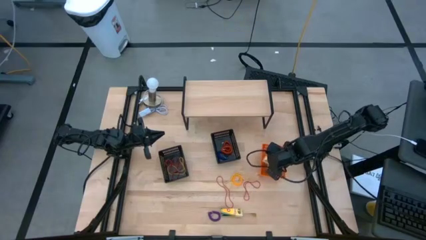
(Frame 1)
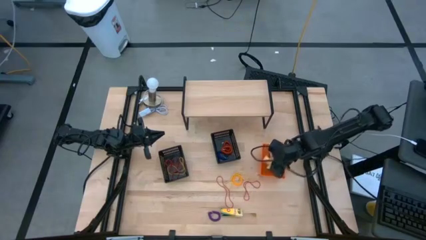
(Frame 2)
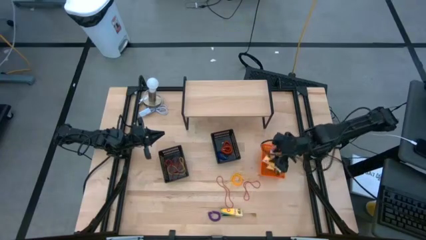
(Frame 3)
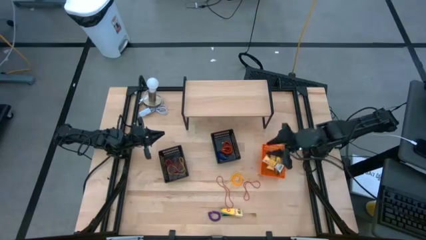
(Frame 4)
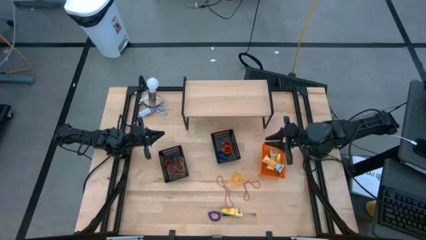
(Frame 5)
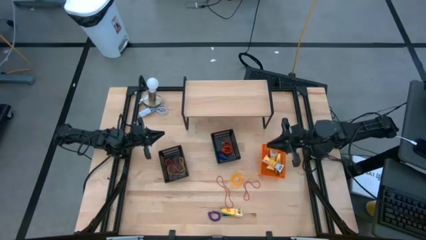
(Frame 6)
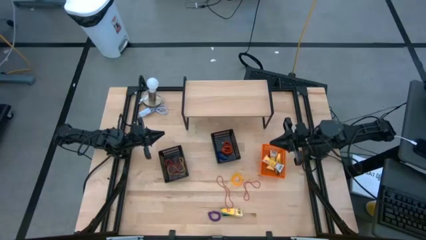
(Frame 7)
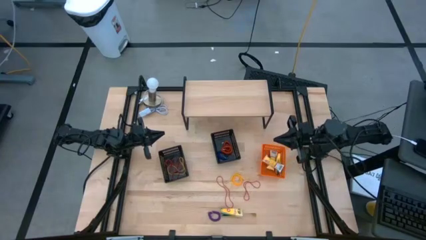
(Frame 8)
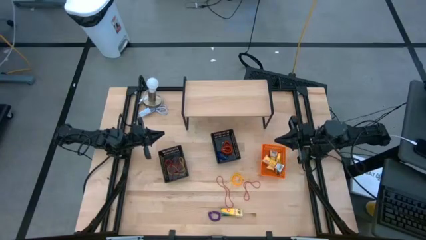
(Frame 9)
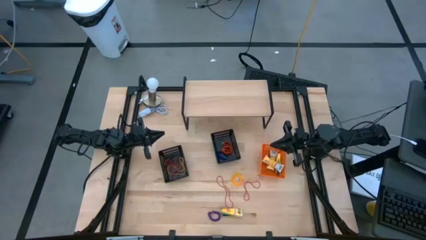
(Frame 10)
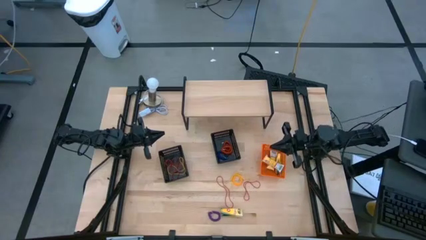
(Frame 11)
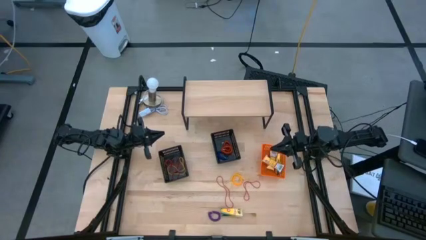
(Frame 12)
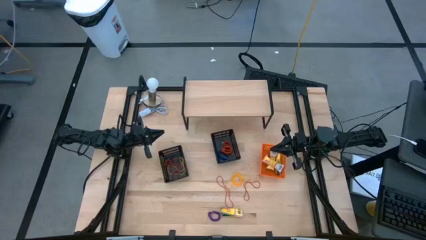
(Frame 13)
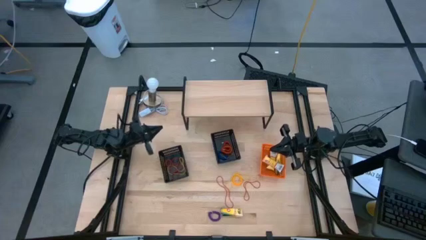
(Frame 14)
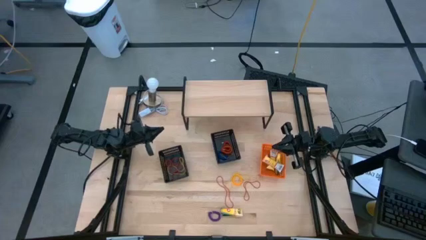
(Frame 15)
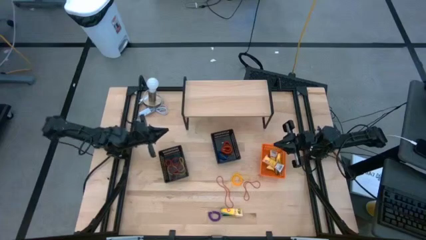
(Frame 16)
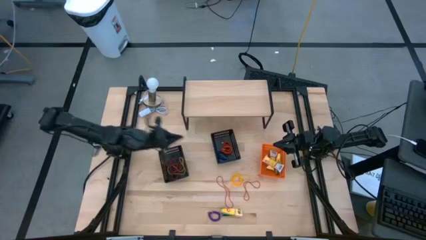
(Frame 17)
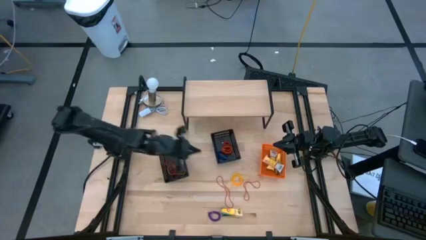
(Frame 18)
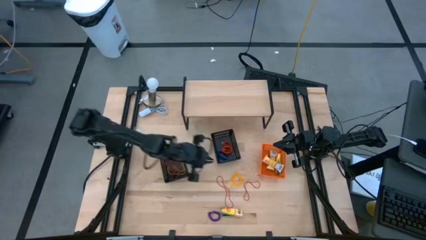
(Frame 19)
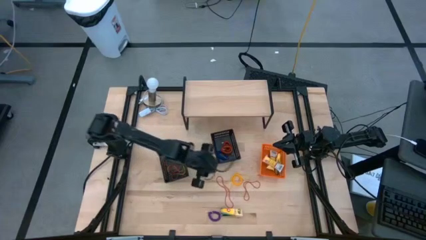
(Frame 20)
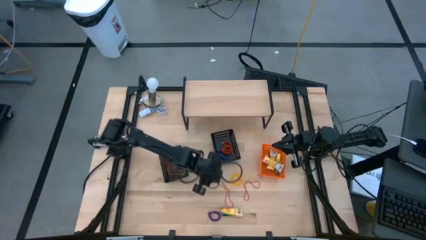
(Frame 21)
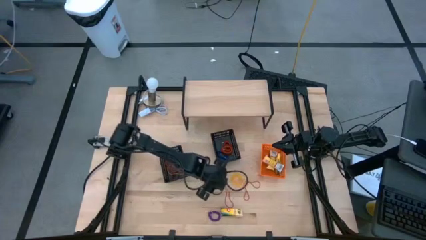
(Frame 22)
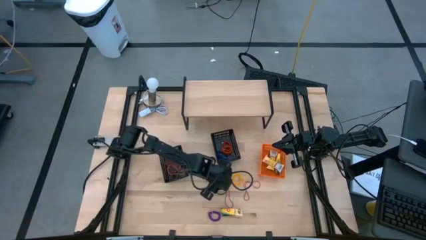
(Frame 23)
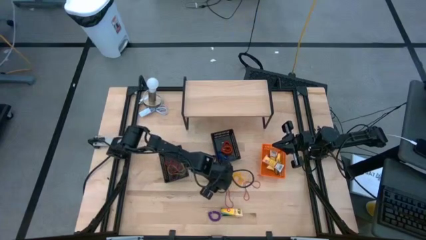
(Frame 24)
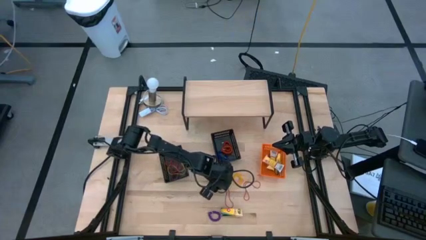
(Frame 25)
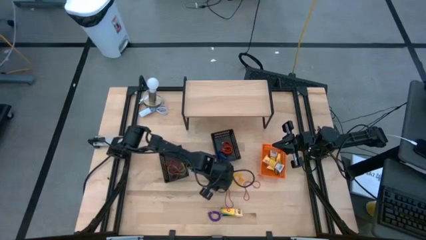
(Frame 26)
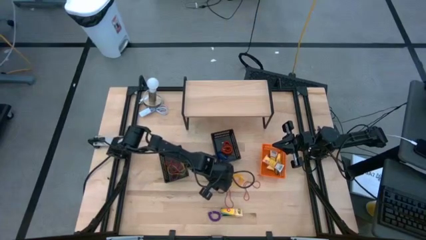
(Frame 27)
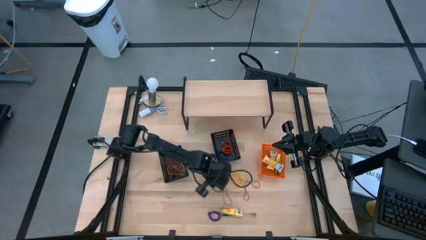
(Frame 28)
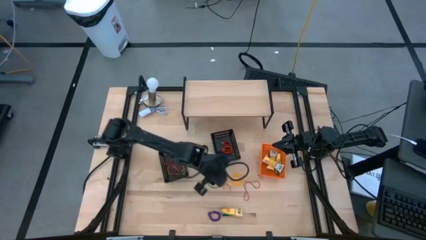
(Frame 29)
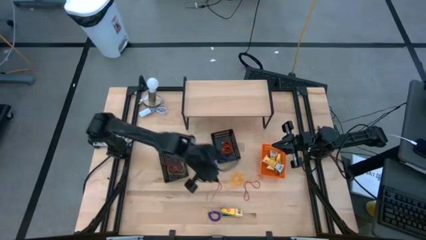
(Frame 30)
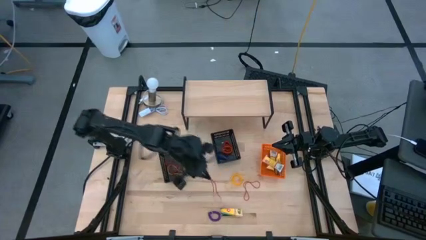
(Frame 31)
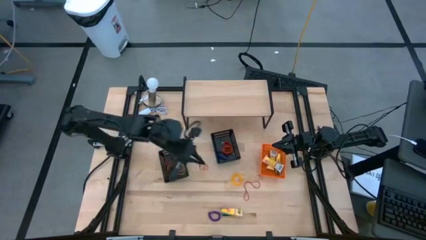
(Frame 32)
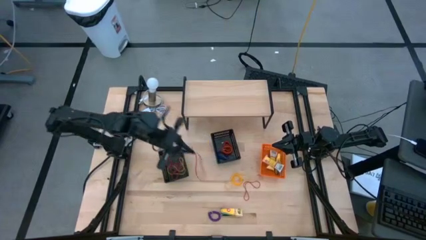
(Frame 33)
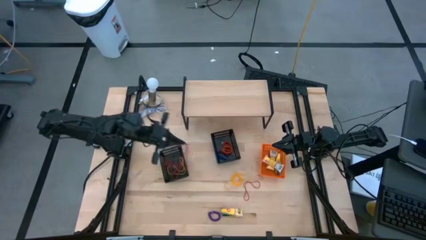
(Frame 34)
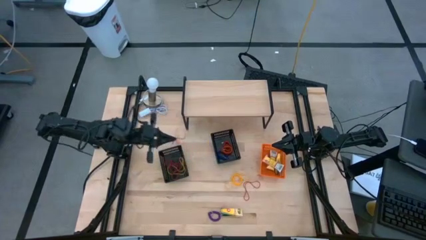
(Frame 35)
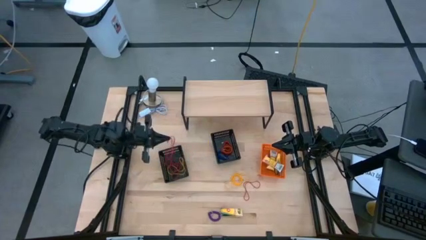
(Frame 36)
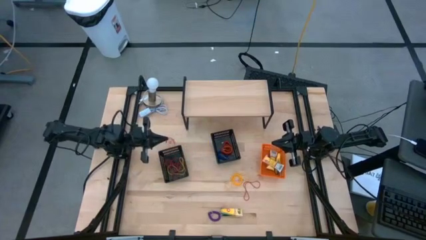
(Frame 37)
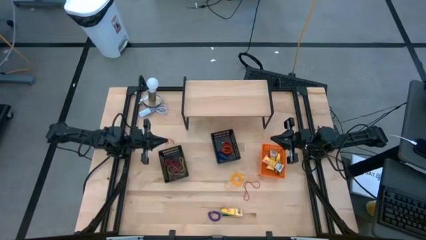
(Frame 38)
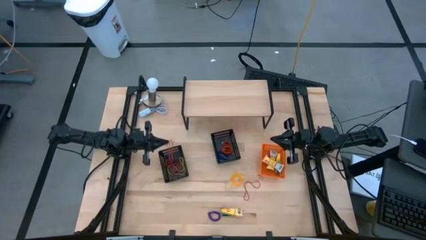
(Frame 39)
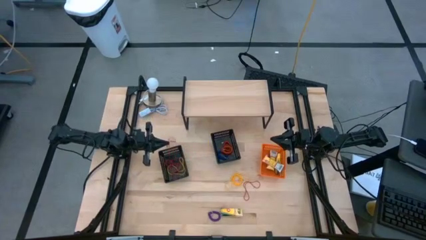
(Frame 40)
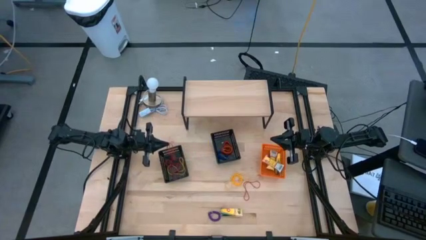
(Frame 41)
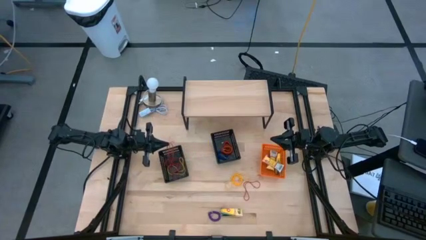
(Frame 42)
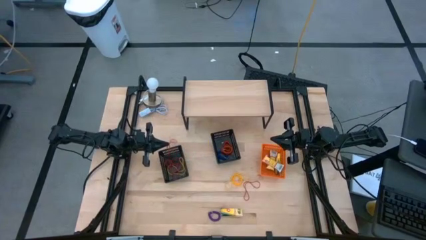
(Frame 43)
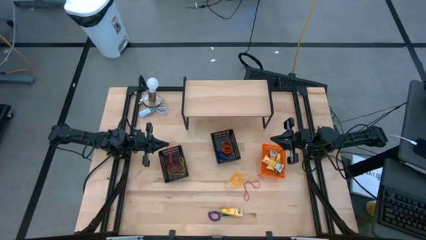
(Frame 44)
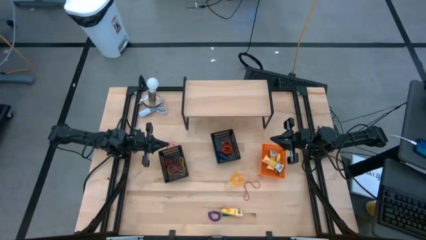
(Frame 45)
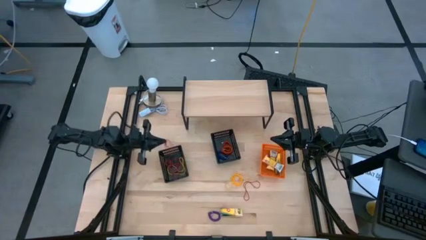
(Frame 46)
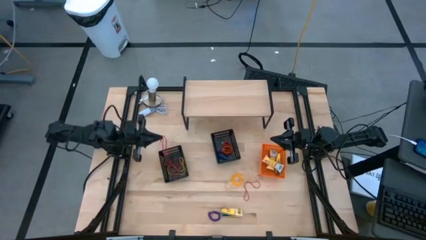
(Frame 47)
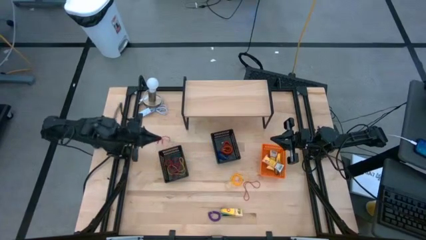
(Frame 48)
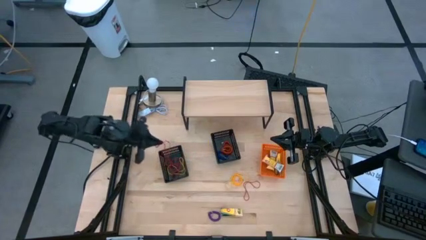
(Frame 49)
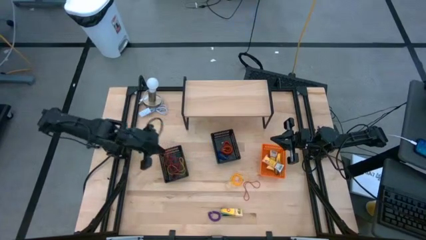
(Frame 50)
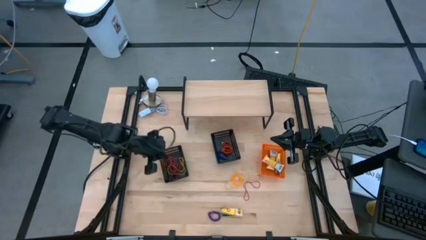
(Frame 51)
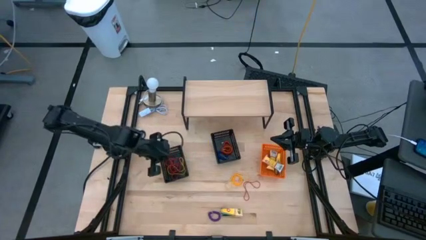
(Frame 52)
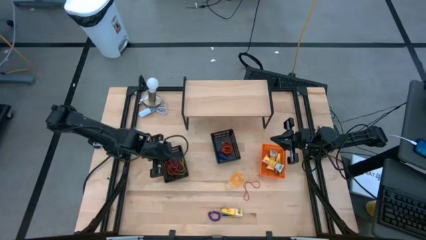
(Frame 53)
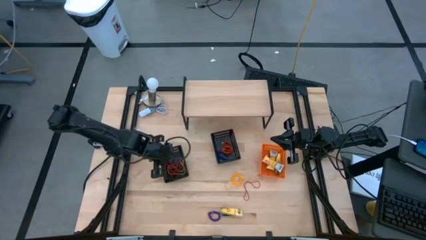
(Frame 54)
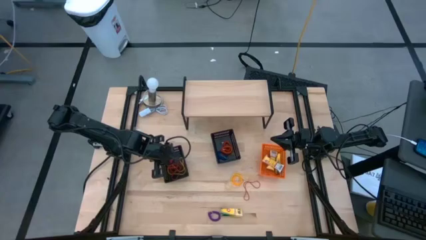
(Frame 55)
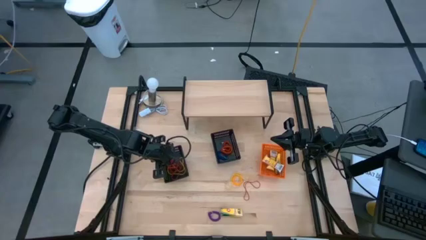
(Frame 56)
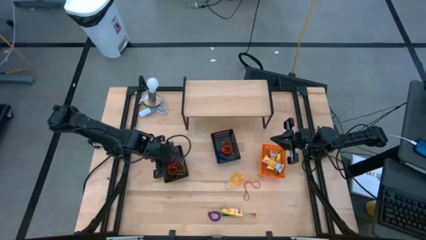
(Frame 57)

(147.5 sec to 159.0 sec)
Task: Pick & Place Office Desk Supplies
Put the red rubber band into the left black bin
